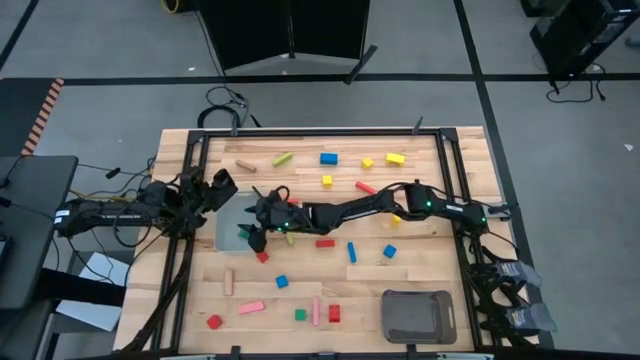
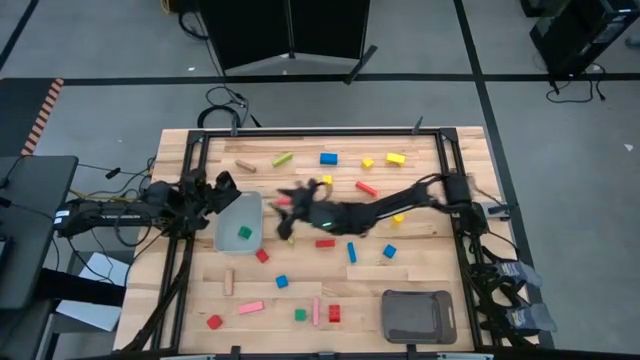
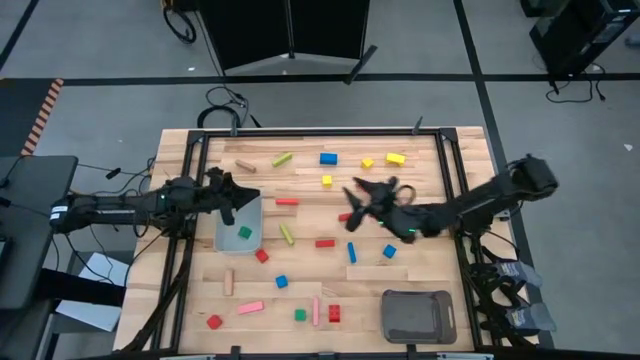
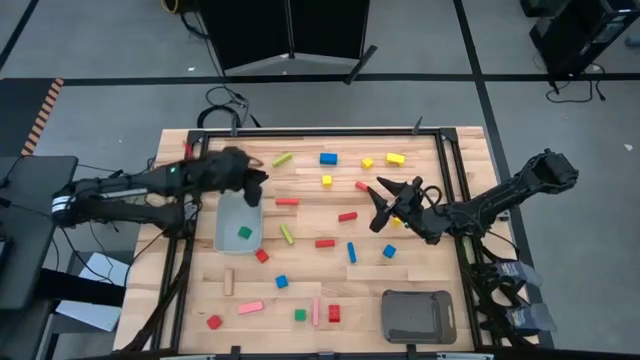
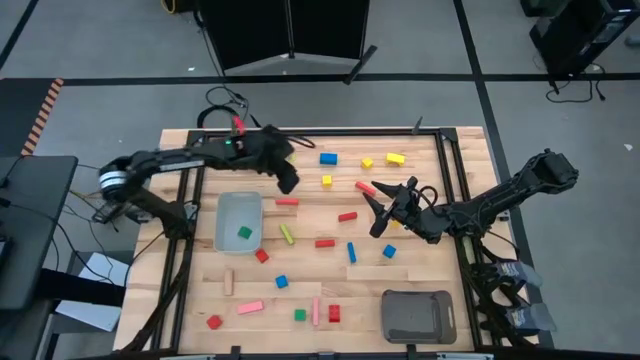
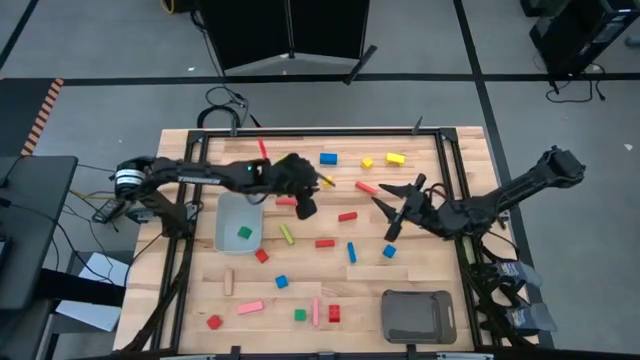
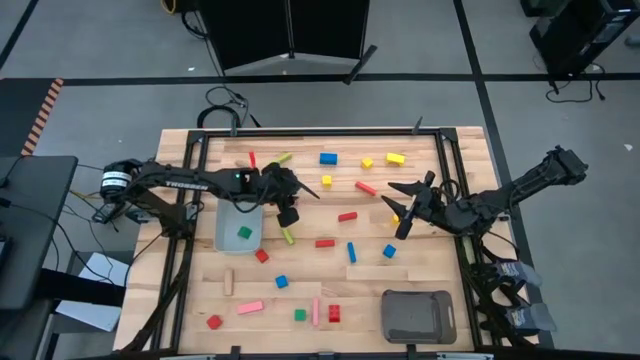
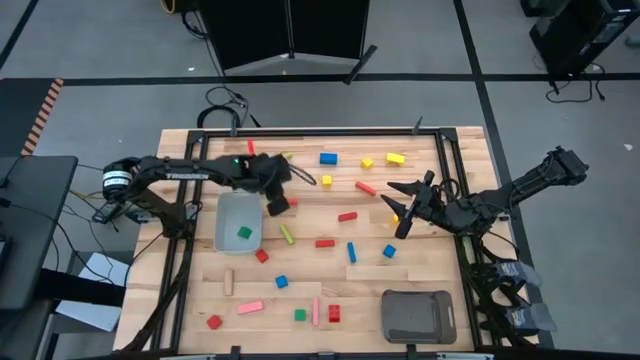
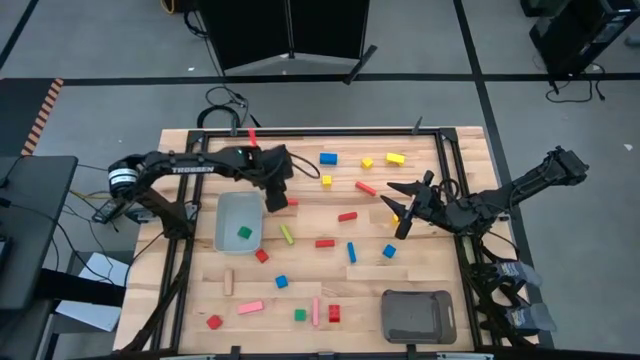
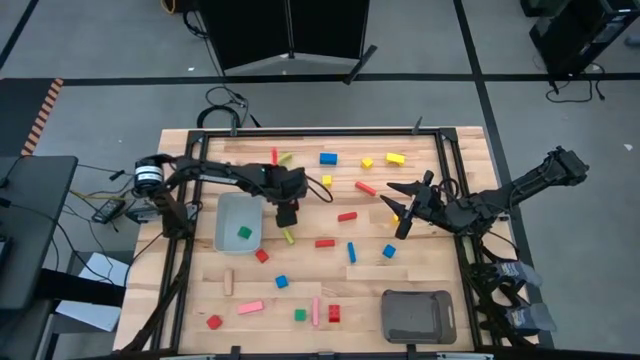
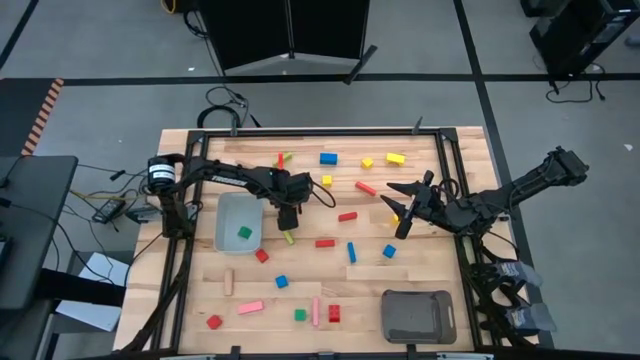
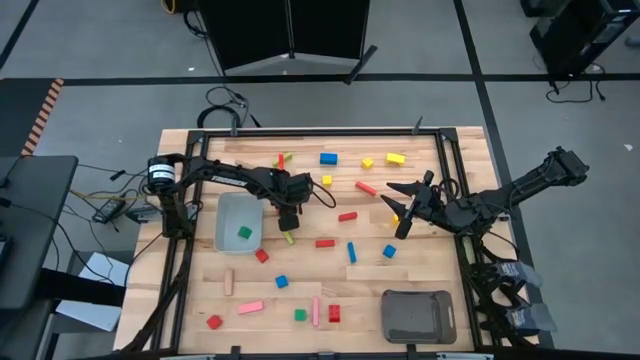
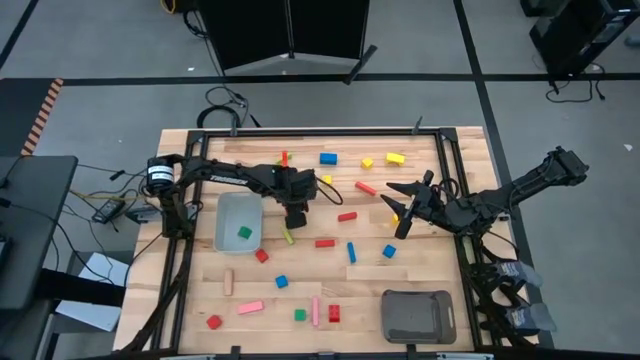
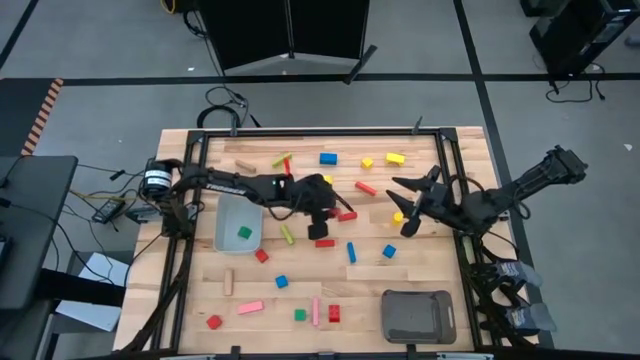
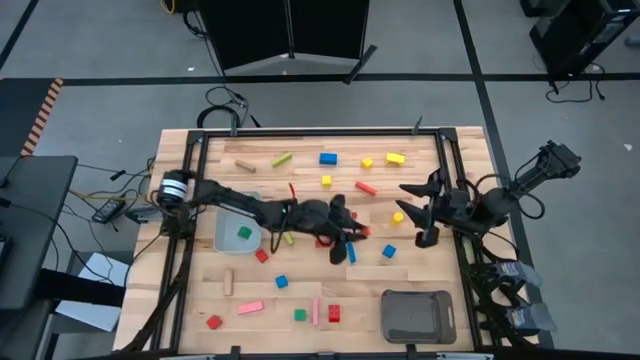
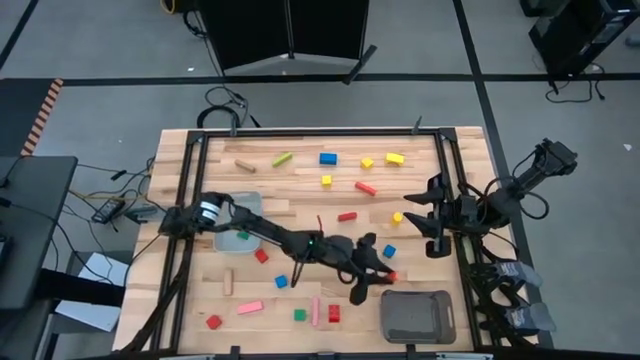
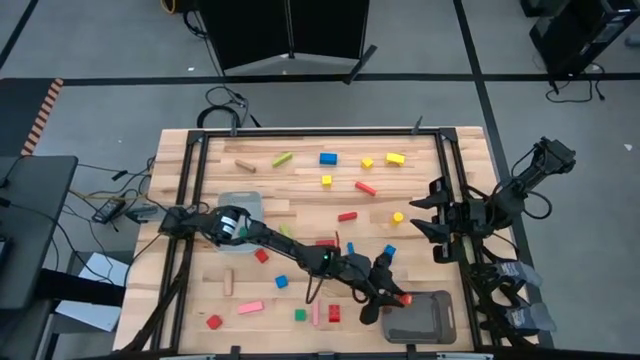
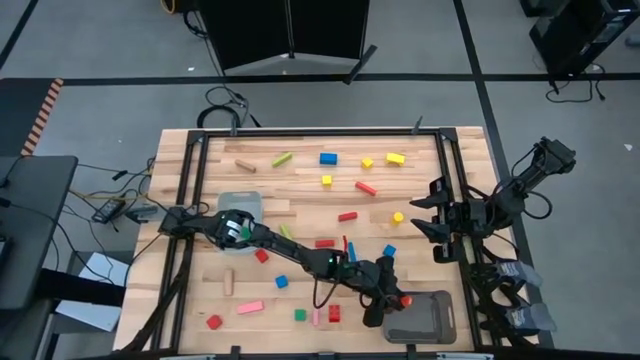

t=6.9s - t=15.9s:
Task: Sort blocks by size
Put the top left orange block into the black bin

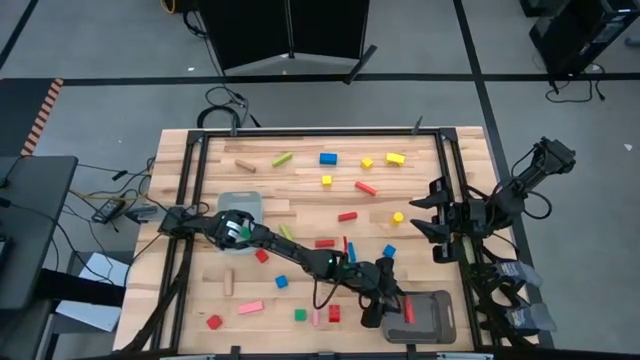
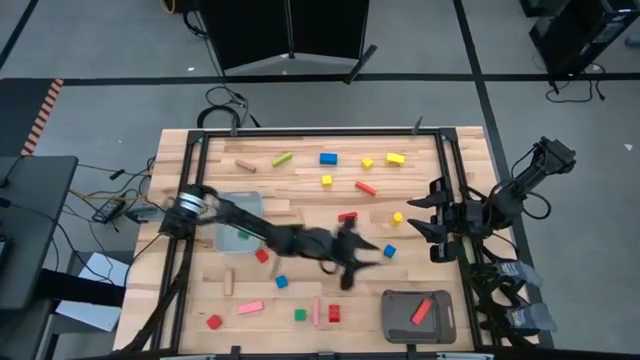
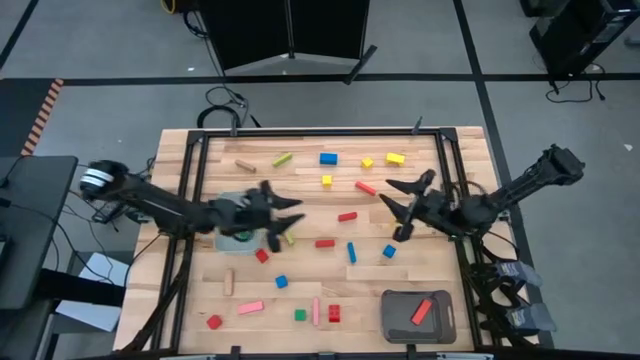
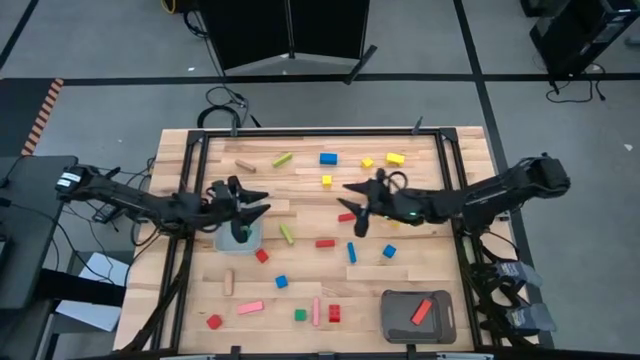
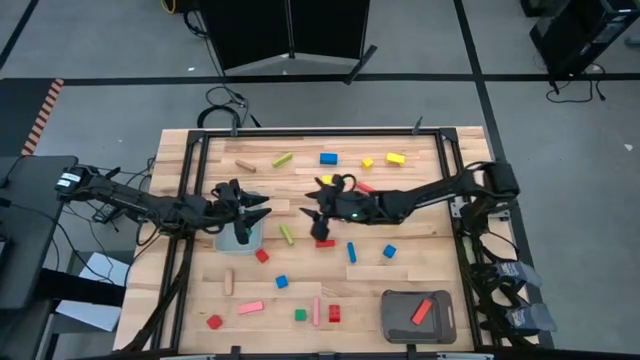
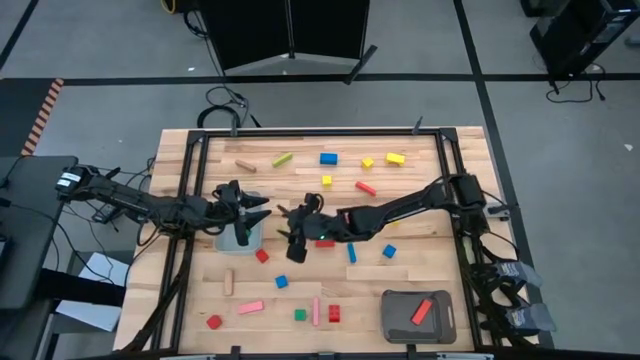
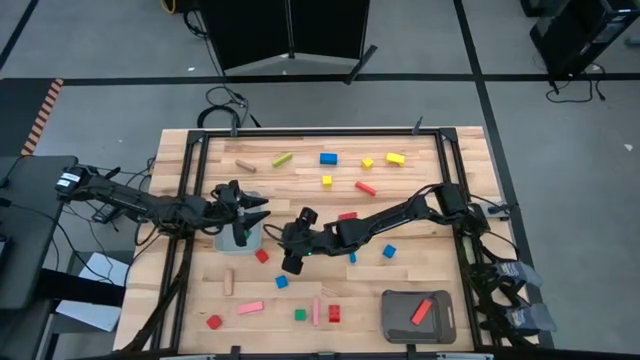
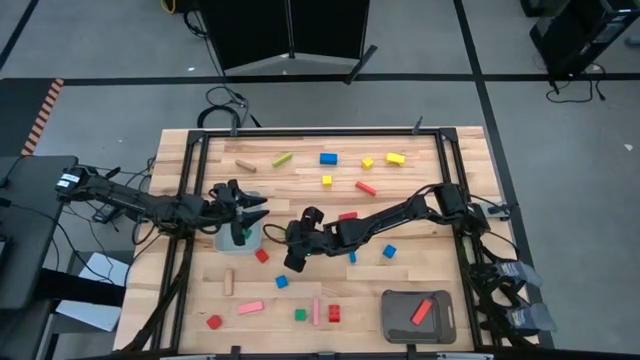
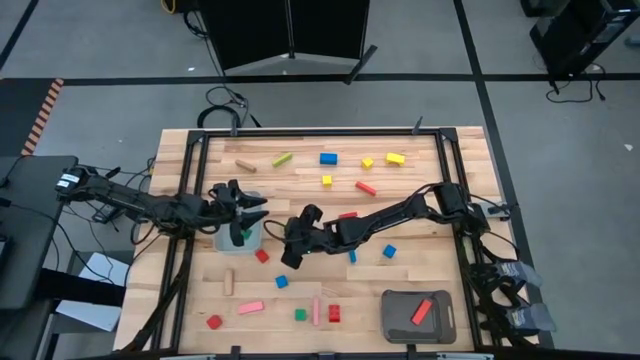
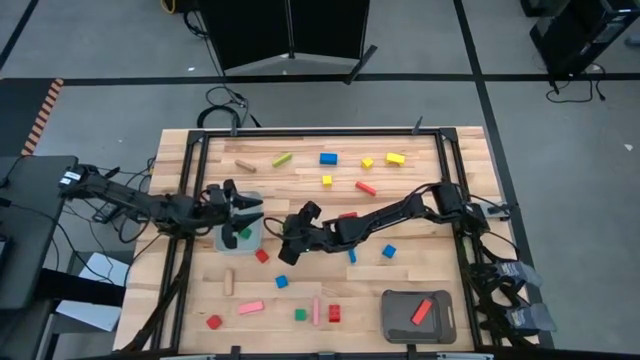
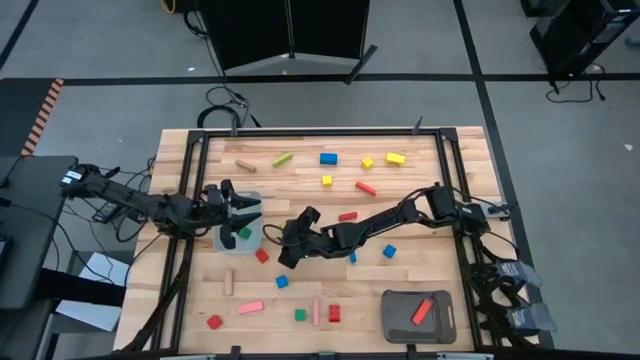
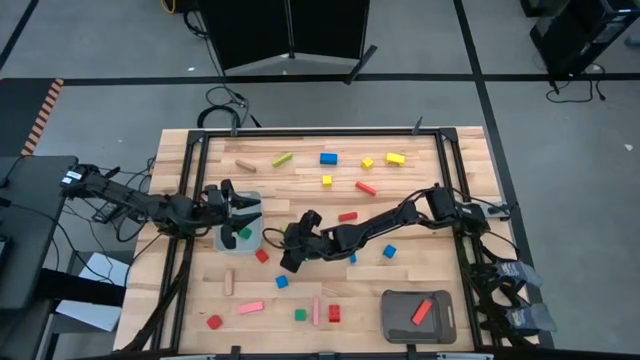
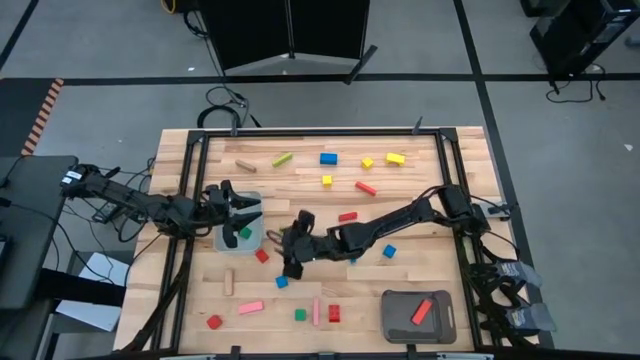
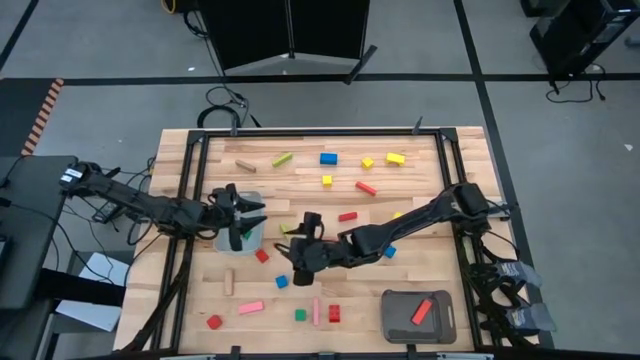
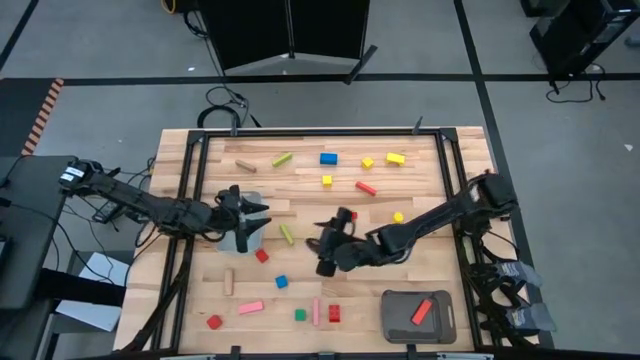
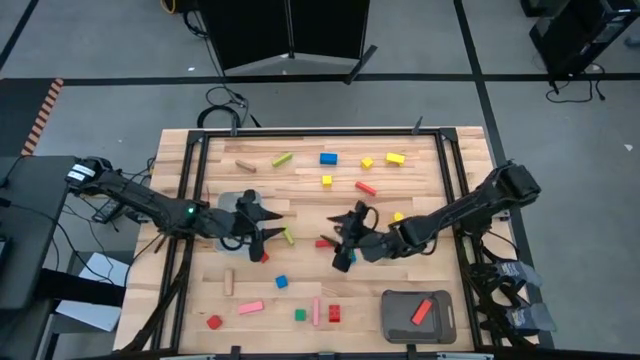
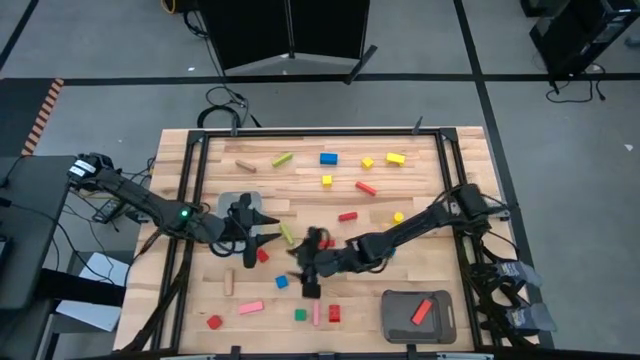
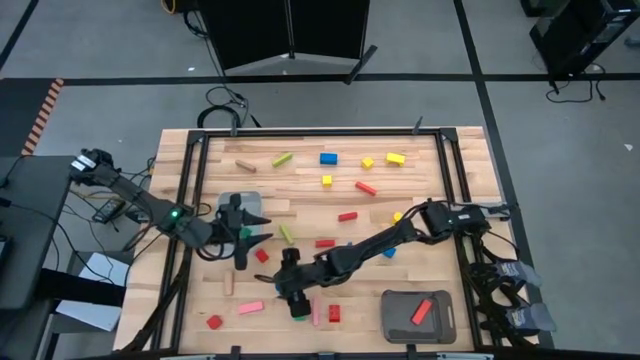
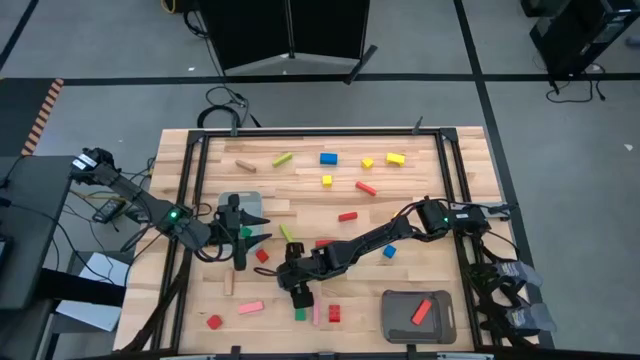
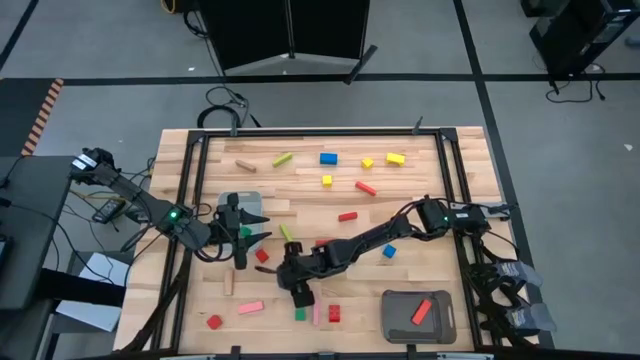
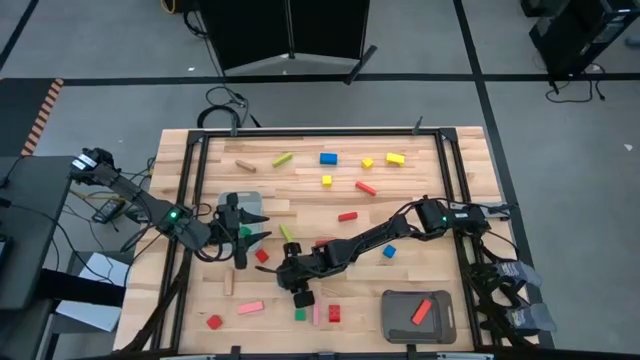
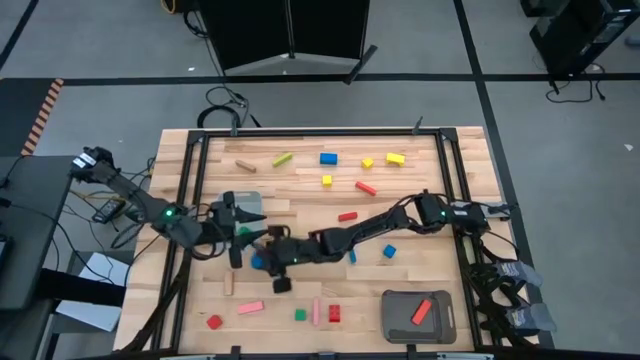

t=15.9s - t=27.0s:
Put the middle left blue block into the grey bin
